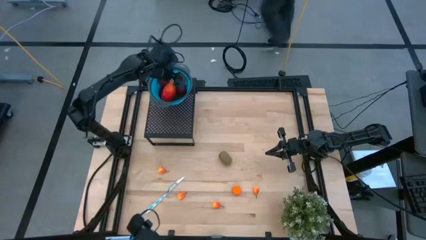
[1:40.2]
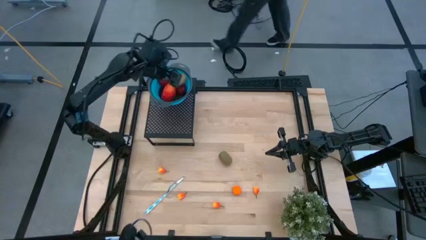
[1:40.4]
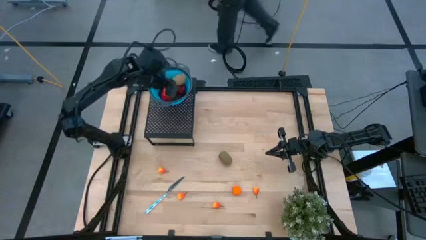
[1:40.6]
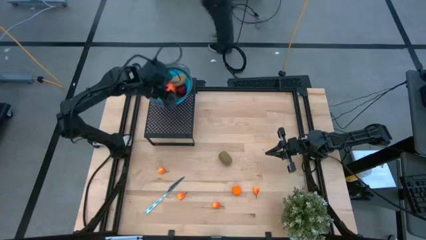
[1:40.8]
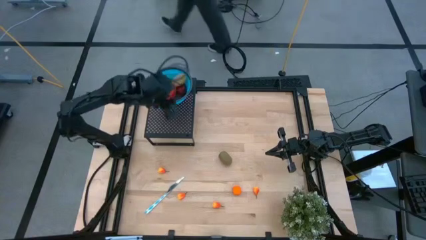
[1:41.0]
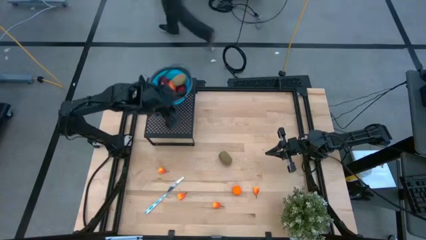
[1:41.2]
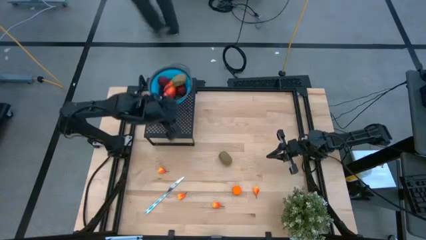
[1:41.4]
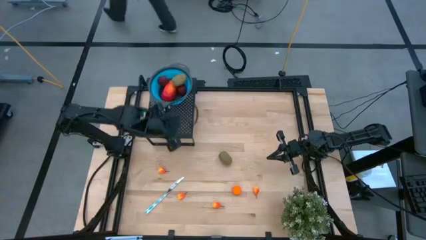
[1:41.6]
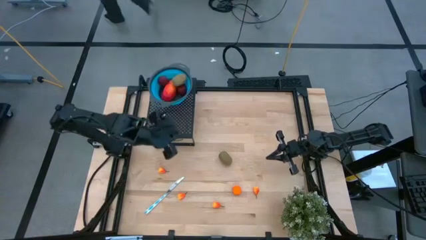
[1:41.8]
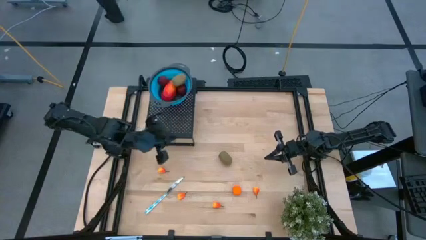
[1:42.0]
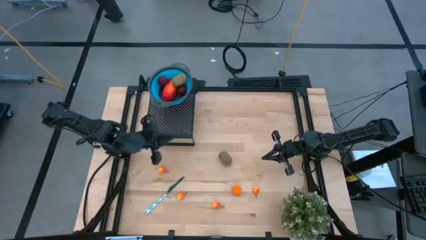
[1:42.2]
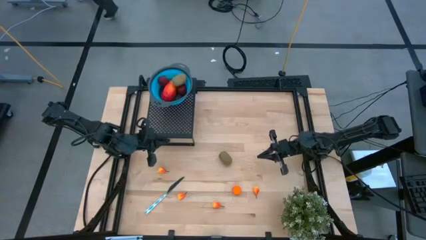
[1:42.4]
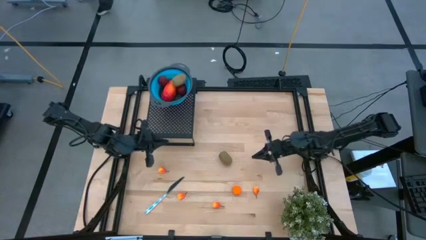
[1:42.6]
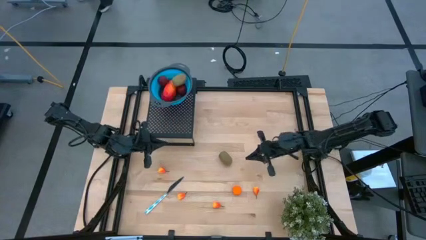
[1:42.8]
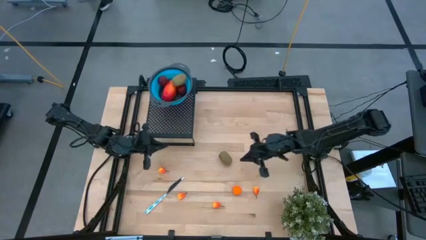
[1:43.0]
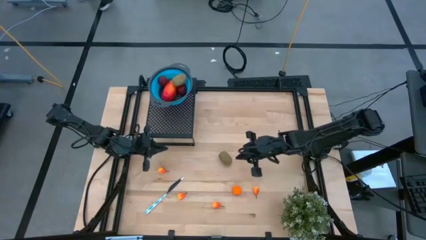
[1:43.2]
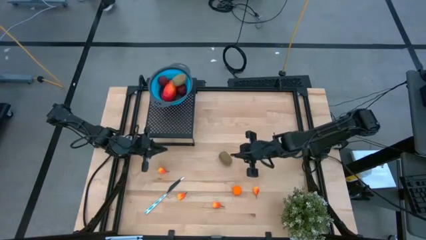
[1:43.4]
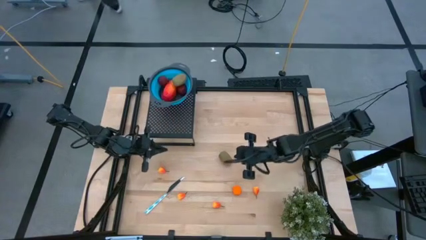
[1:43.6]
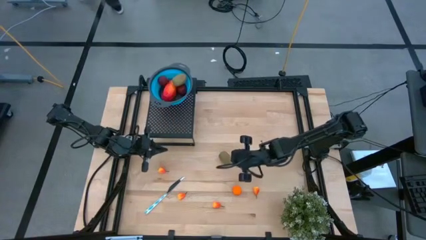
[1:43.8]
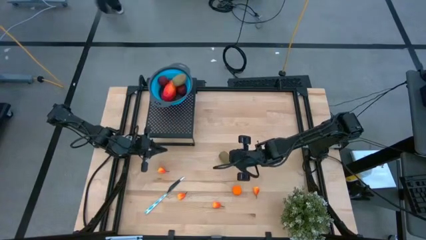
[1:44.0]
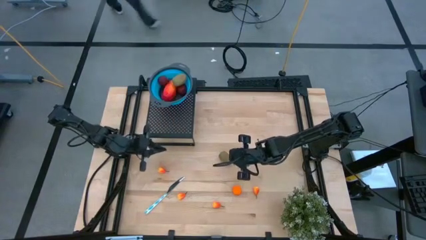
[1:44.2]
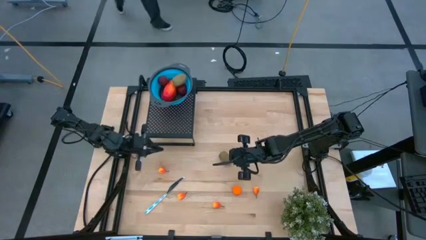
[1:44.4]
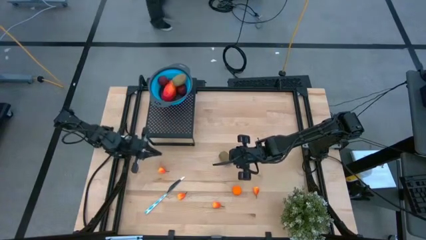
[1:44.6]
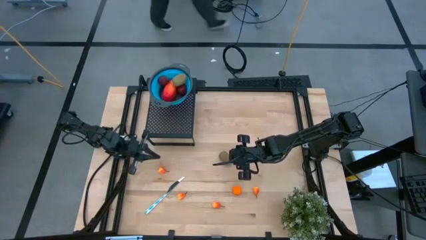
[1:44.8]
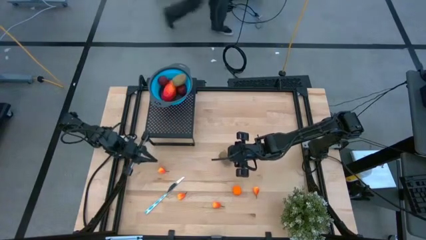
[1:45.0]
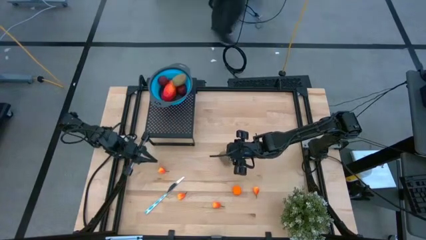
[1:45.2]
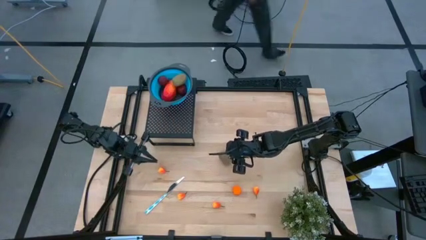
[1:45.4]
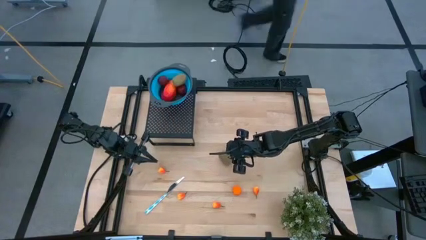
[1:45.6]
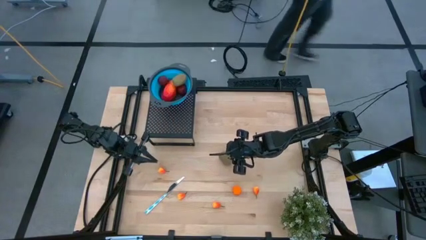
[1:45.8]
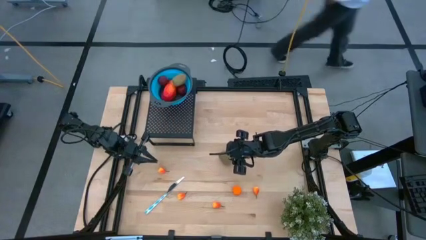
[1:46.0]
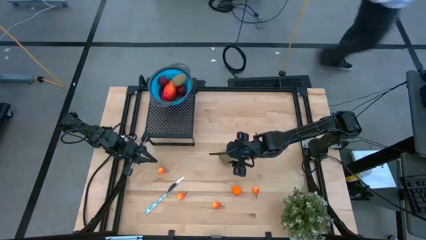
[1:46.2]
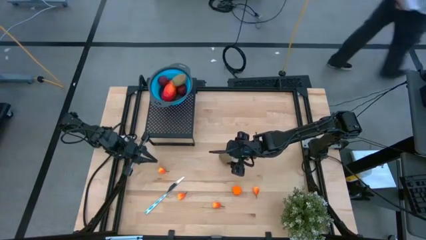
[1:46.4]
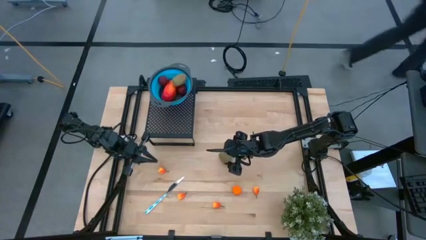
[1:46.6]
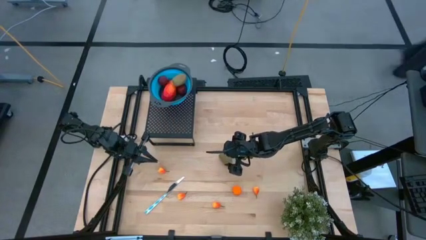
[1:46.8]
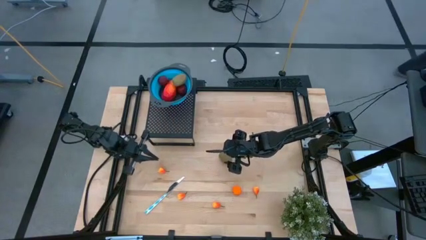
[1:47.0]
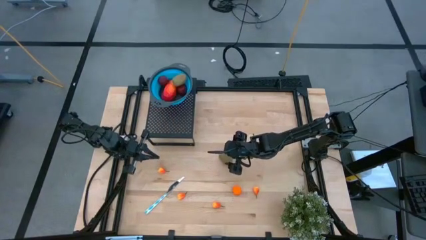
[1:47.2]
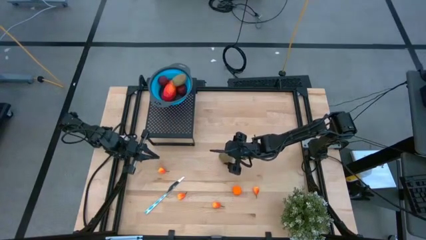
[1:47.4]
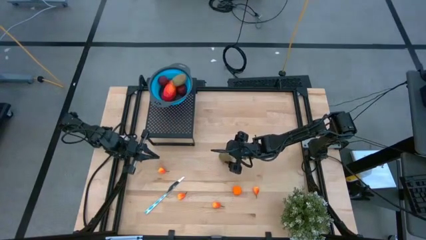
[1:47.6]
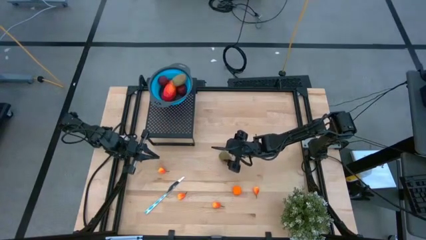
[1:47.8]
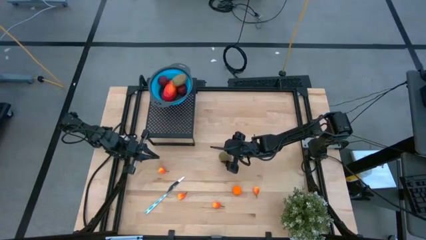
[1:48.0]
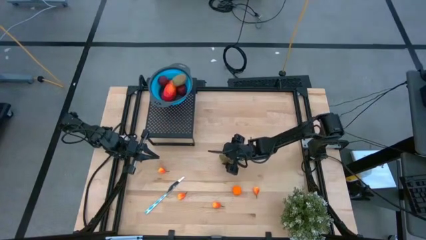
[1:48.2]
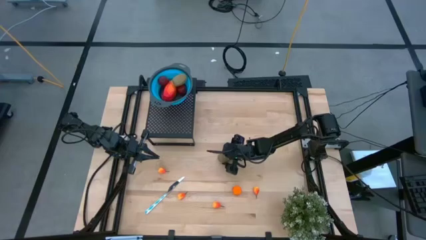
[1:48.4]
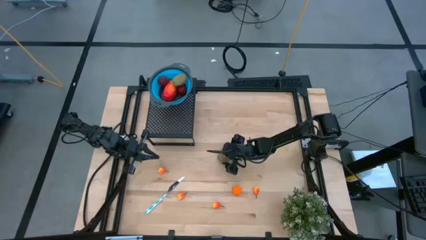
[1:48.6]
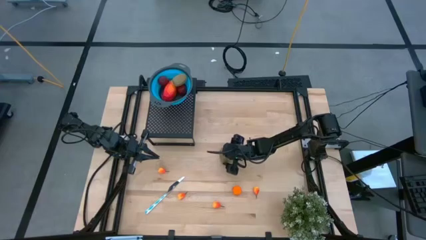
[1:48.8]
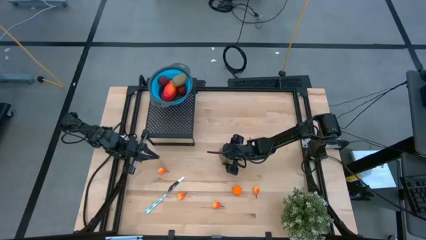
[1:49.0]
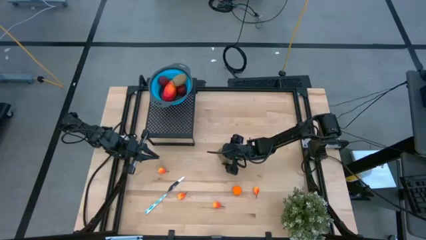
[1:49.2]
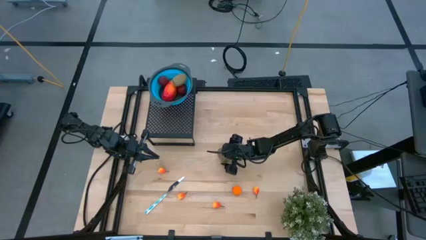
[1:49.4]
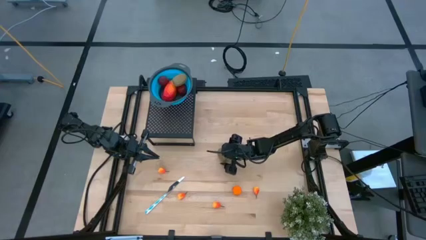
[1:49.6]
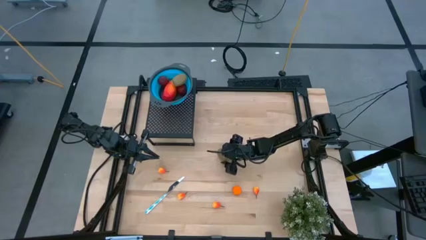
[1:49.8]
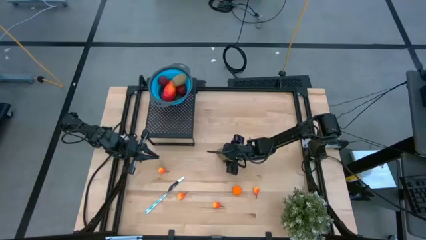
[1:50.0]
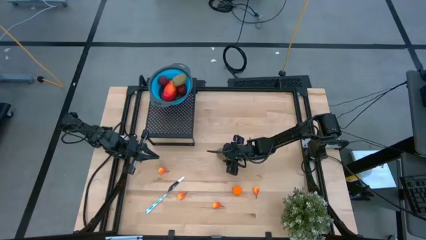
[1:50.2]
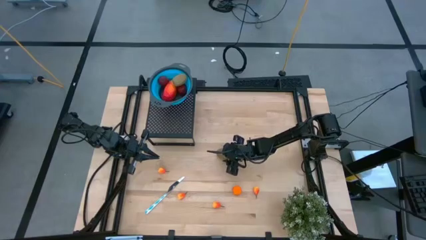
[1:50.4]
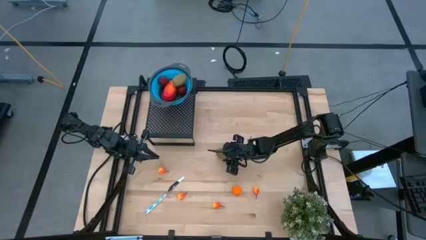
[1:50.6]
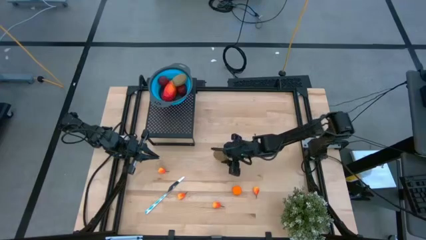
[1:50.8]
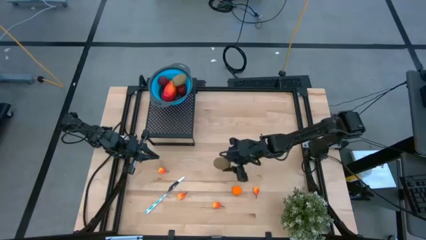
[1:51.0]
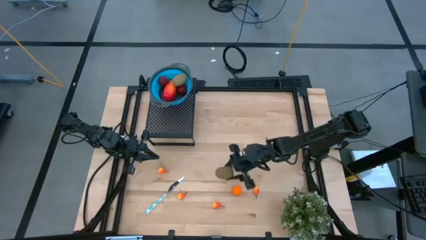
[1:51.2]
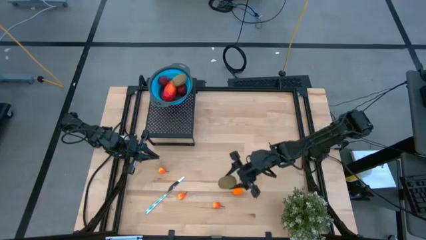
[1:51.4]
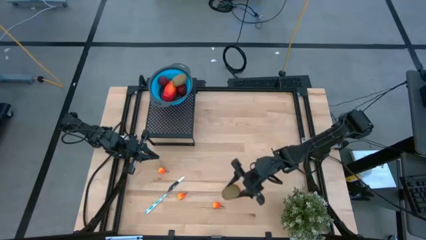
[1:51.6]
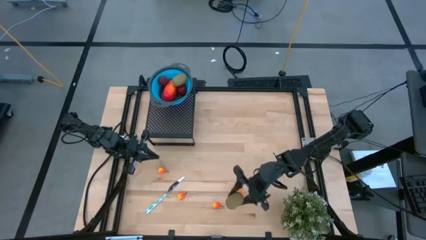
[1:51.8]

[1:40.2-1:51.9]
Task: Pick & Place Fruit
Put the kiwi into the blue strainer bowl on the shelf

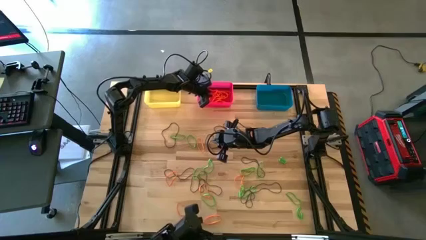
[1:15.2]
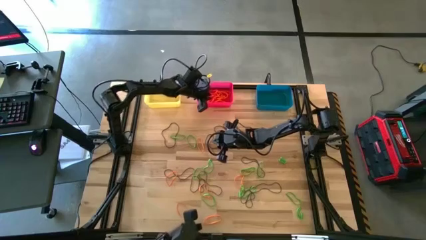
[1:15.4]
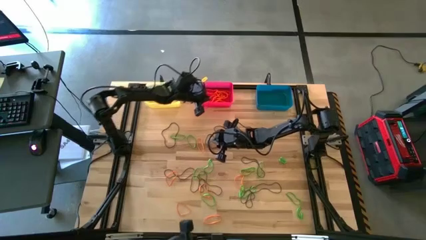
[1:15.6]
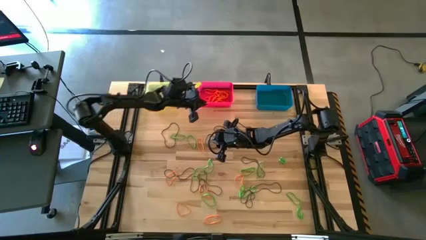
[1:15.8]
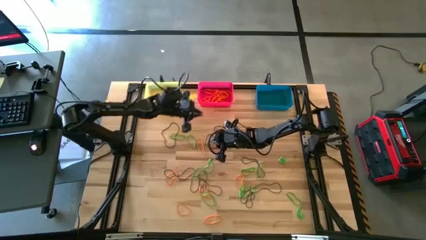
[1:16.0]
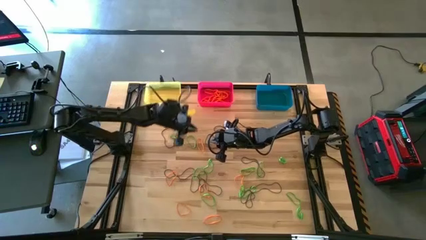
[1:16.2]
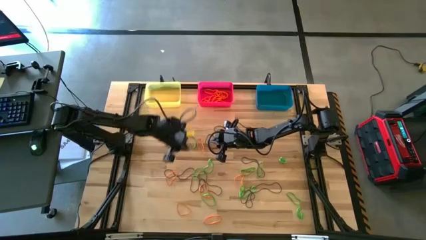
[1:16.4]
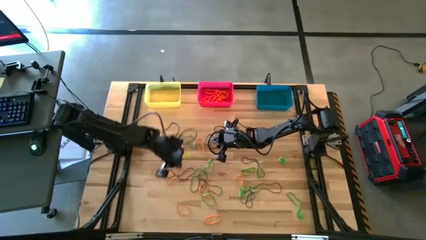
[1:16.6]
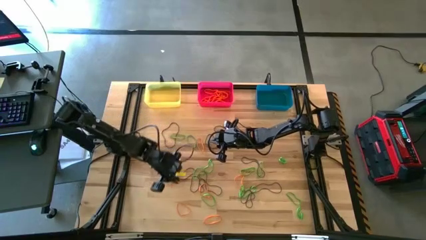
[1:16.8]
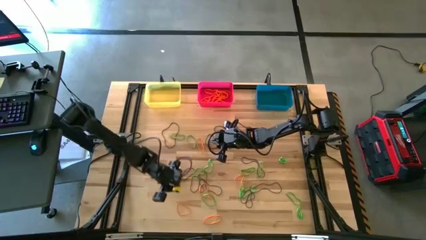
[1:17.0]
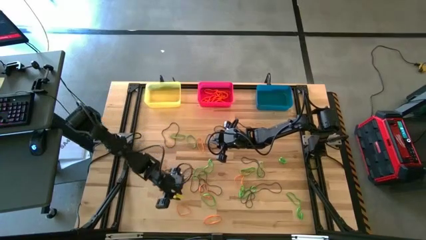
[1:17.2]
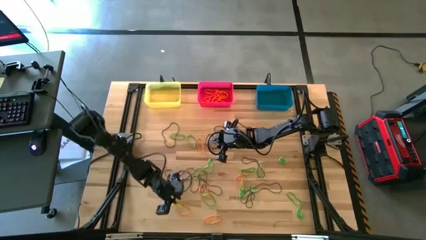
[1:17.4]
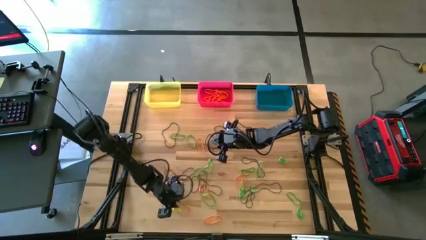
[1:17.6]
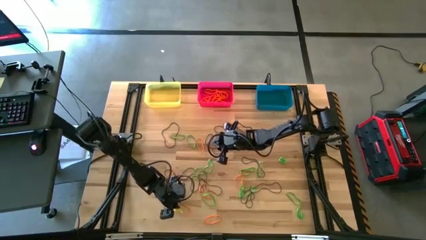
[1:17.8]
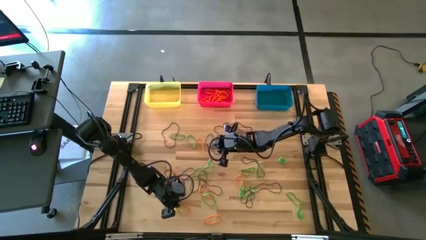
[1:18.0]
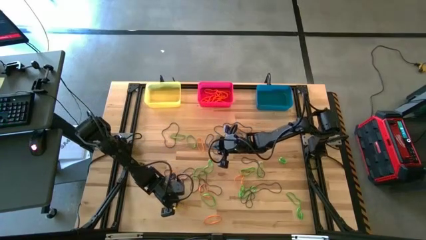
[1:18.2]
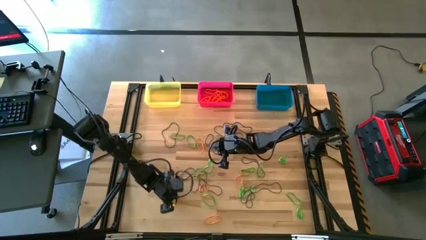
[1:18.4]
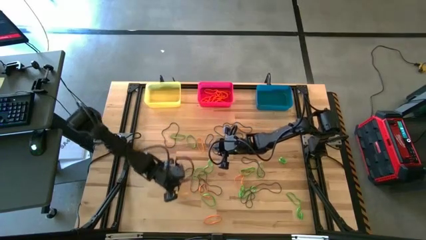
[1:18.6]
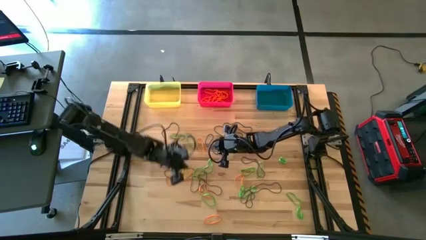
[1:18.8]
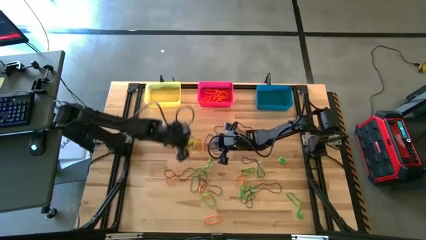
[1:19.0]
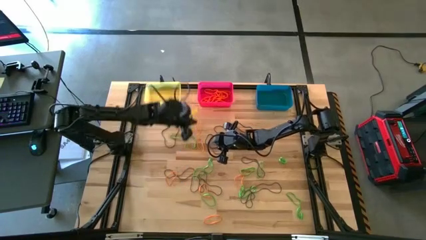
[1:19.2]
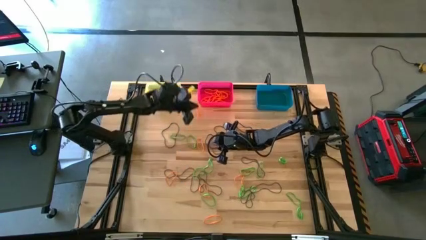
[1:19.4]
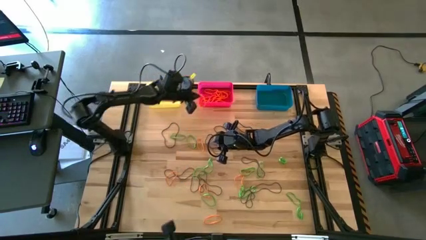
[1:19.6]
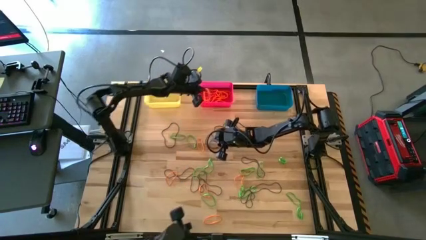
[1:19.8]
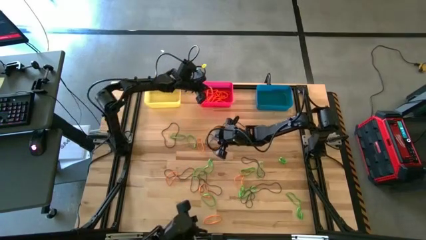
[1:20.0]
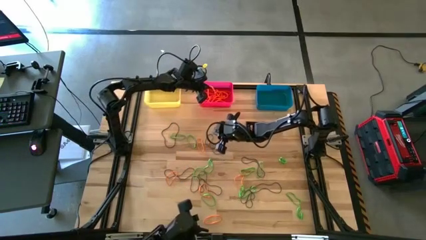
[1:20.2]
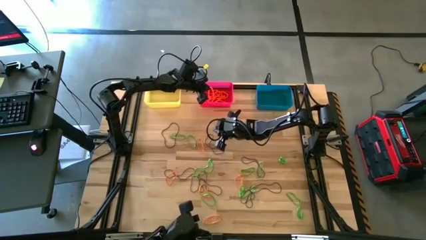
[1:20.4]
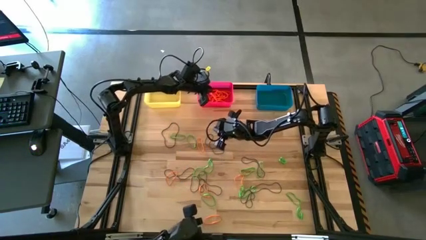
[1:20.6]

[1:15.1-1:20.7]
Task: Sort rubber bands into baskets
Put the orange rubber band into the pink bin
